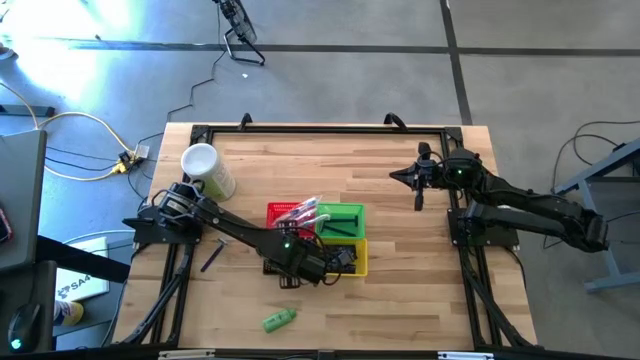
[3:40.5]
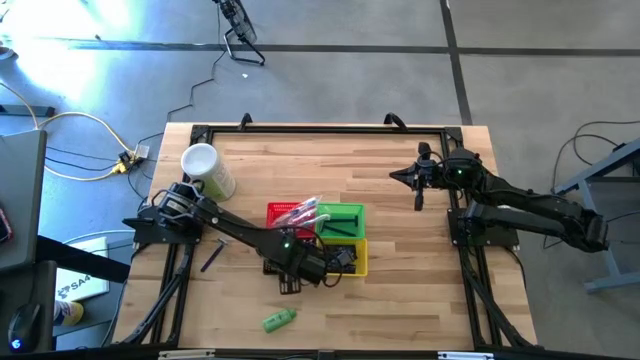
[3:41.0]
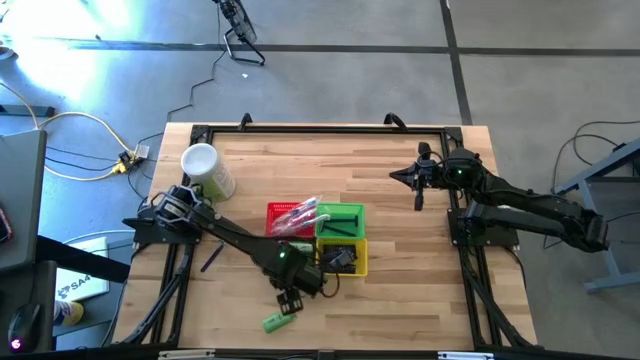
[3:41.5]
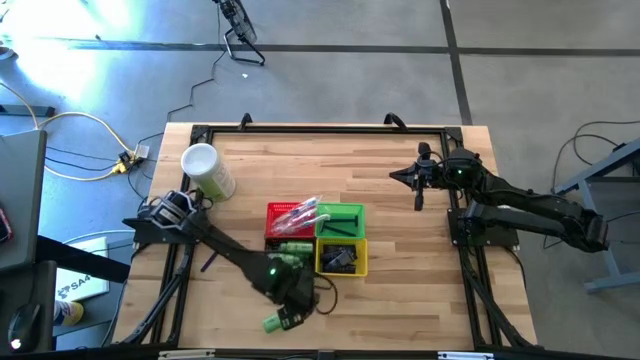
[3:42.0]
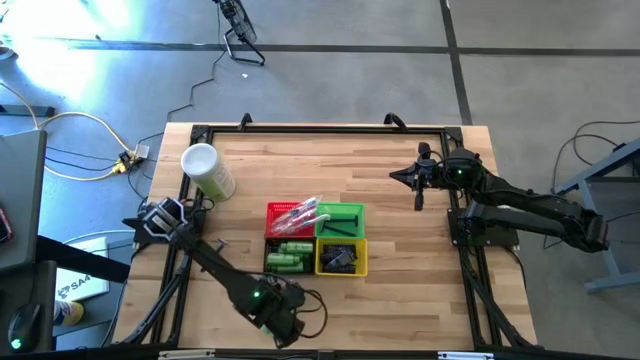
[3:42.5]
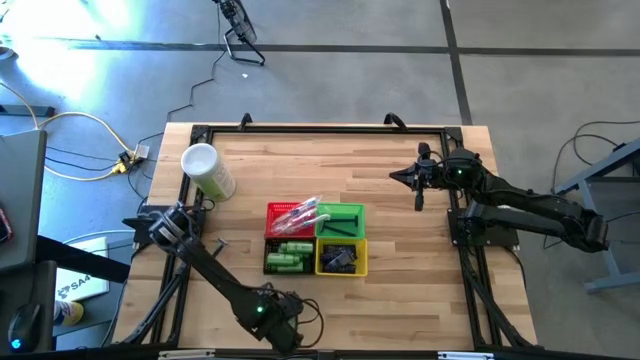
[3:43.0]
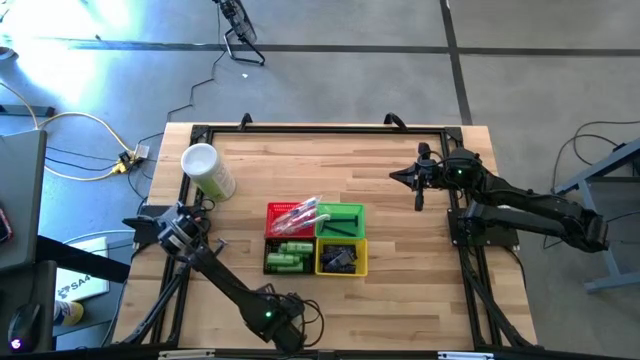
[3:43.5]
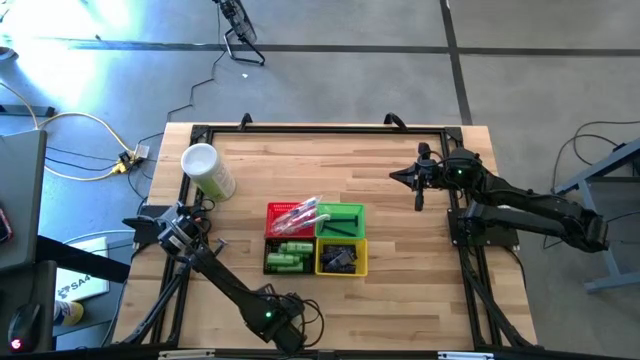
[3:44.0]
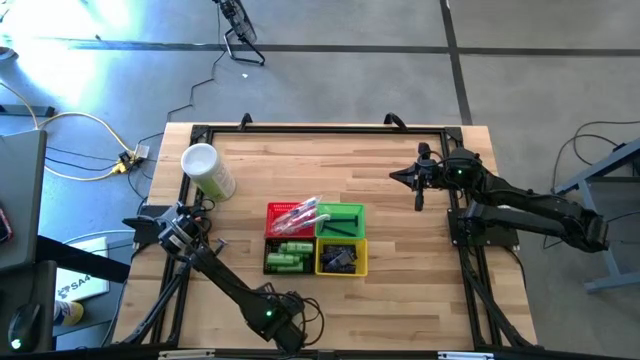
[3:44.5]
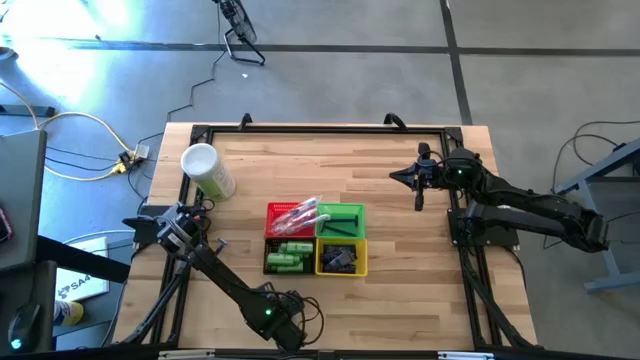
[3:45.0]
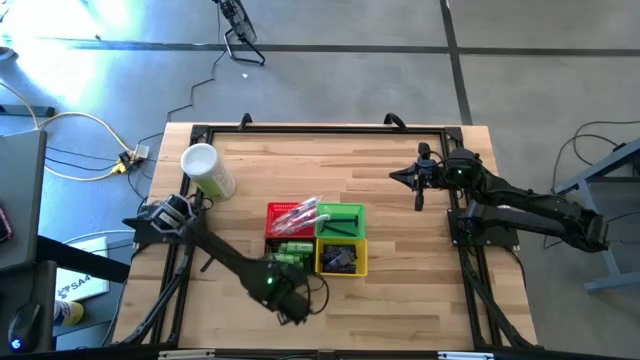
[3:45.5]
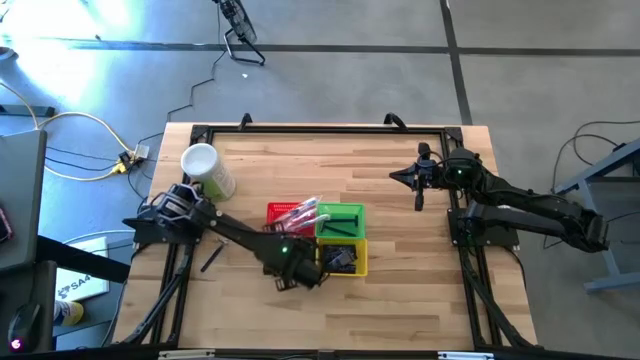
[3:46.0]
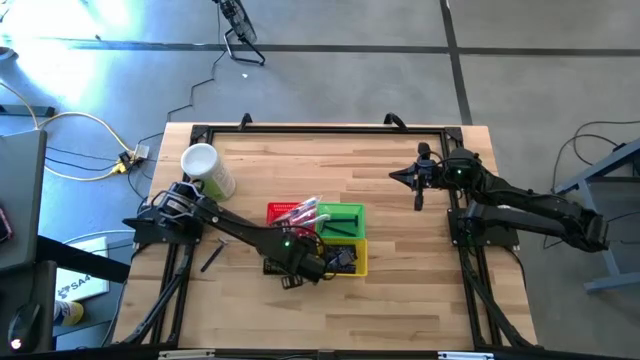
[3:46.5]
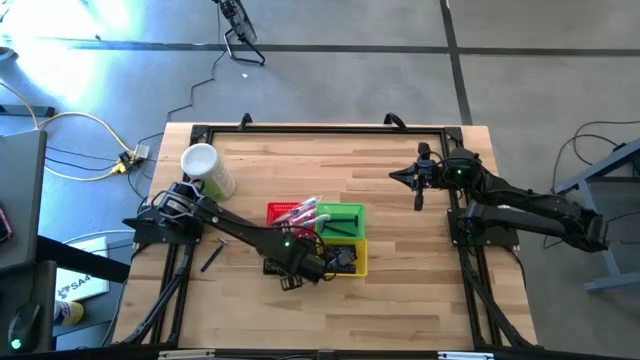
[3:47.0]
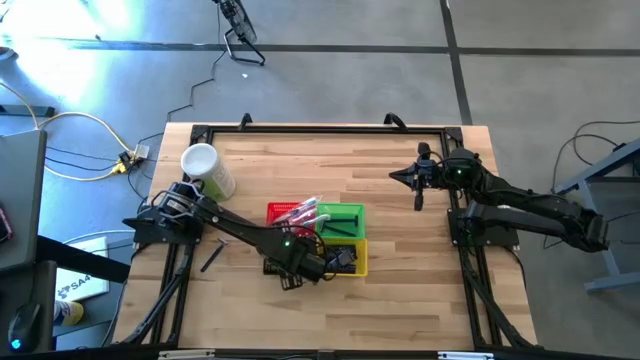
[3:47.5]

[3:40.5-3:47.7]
Task: Pick & Place Travel size toiletries
Put the green shampoo bottle into the black bin

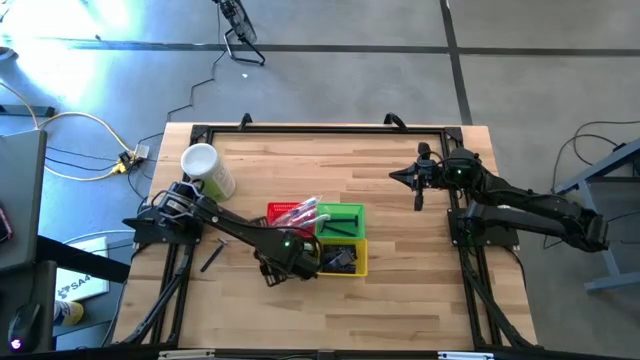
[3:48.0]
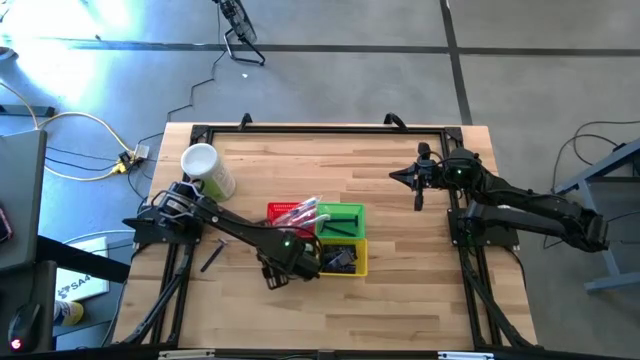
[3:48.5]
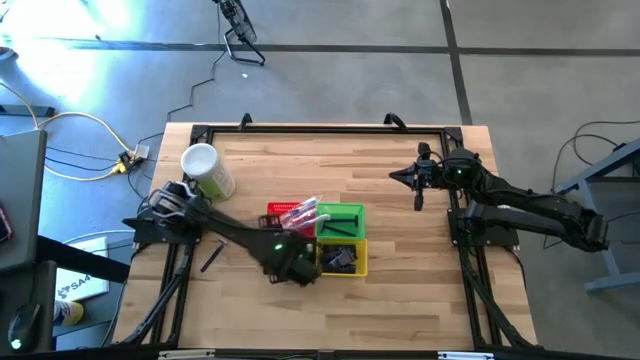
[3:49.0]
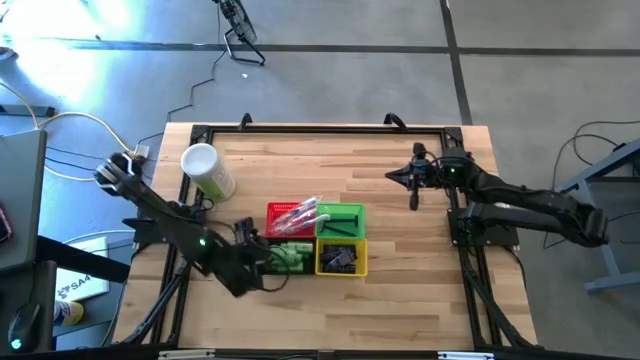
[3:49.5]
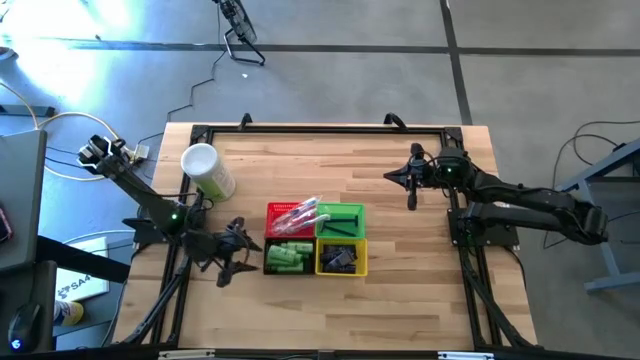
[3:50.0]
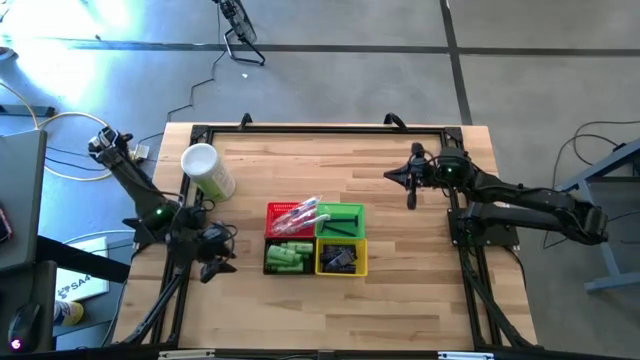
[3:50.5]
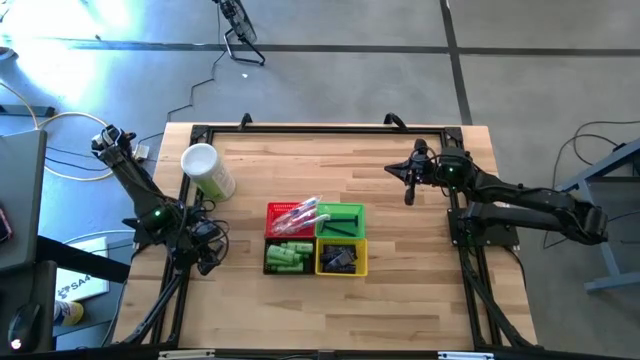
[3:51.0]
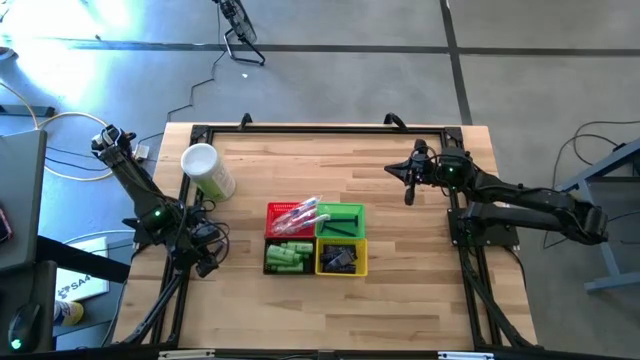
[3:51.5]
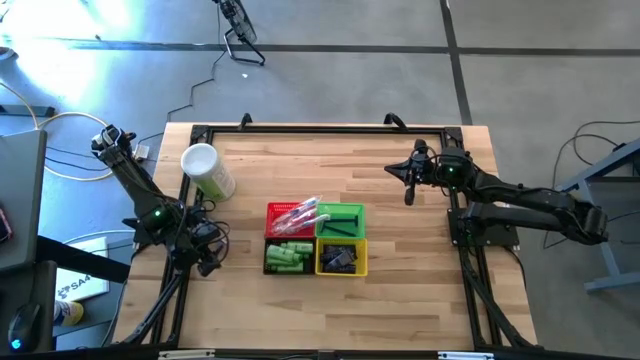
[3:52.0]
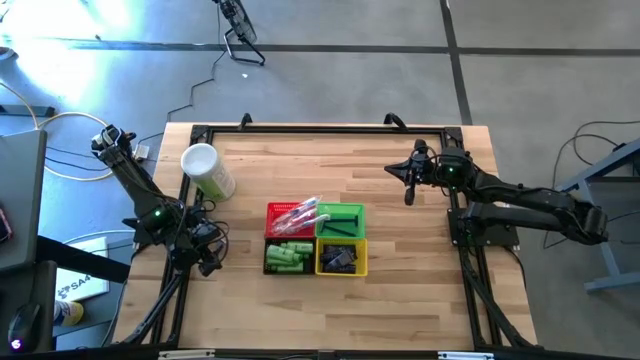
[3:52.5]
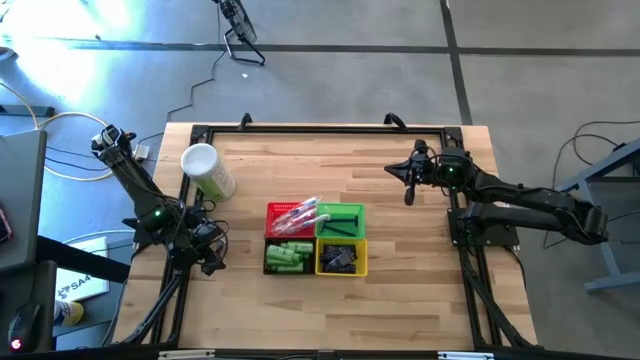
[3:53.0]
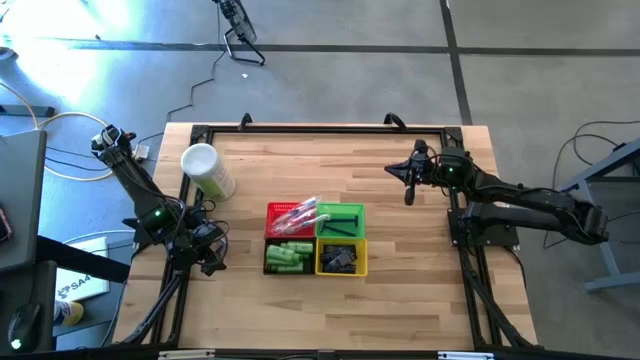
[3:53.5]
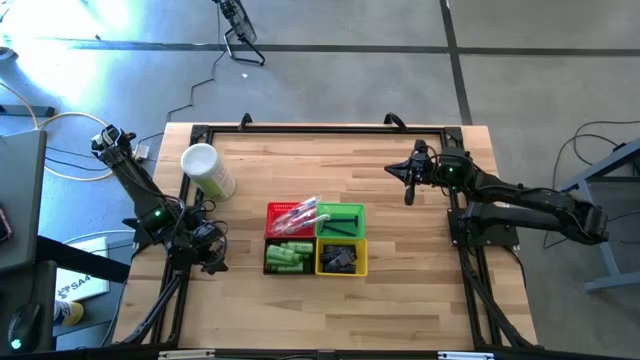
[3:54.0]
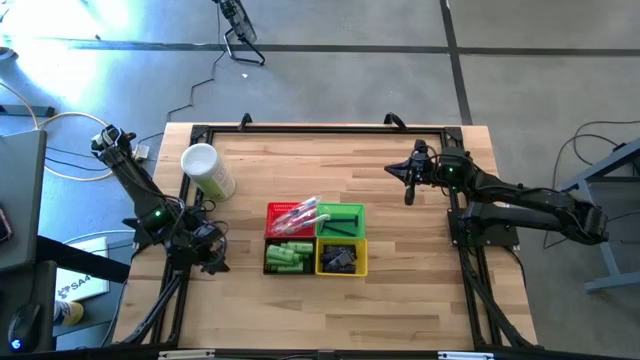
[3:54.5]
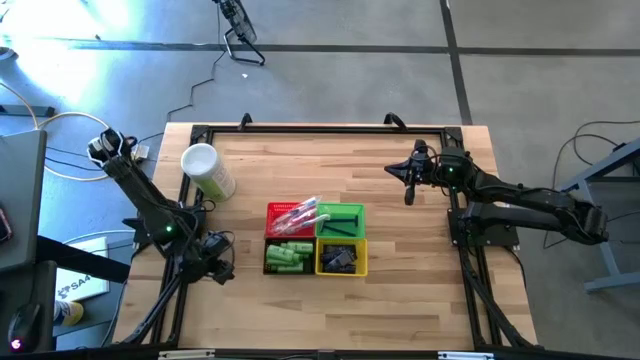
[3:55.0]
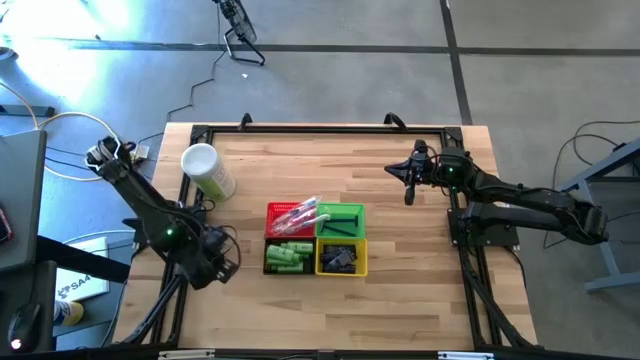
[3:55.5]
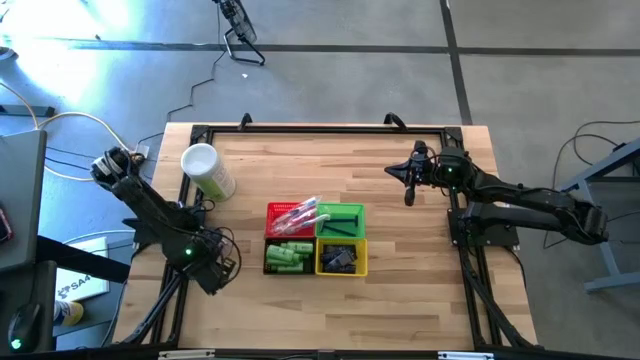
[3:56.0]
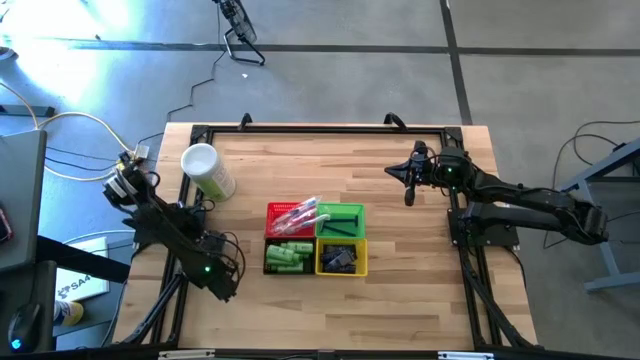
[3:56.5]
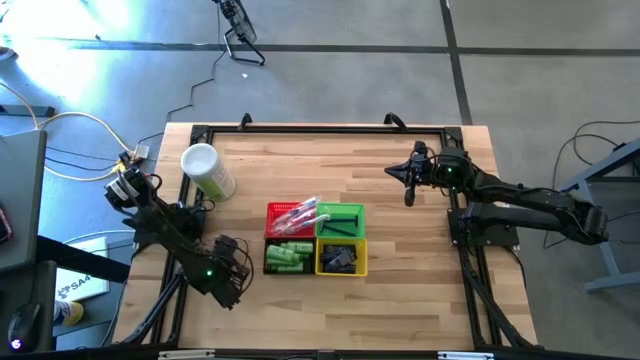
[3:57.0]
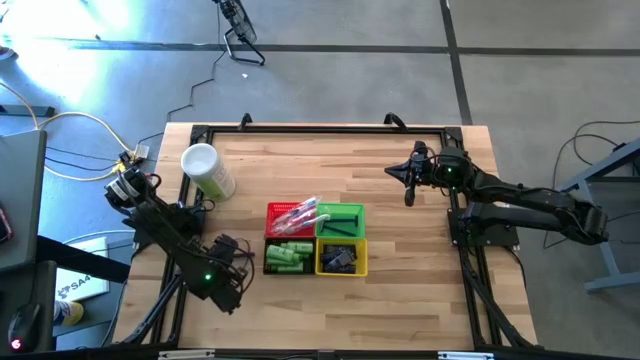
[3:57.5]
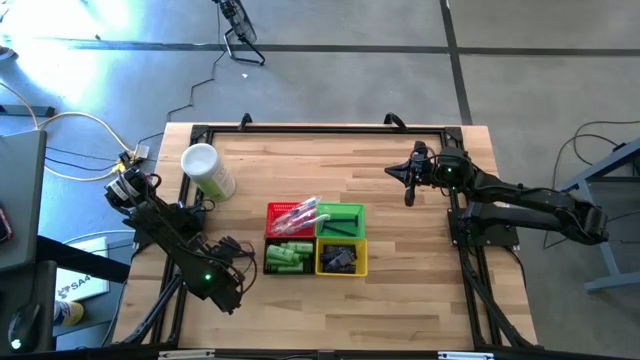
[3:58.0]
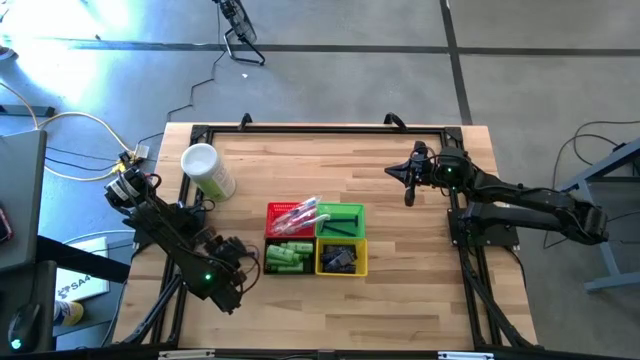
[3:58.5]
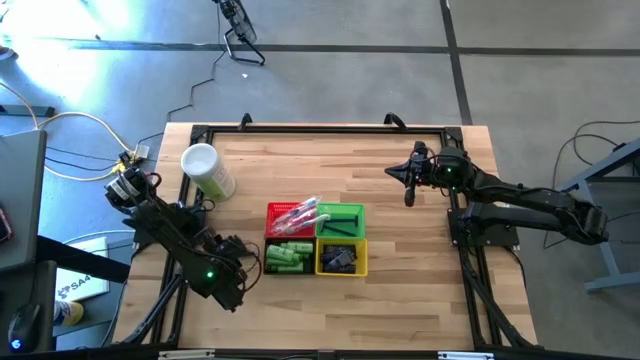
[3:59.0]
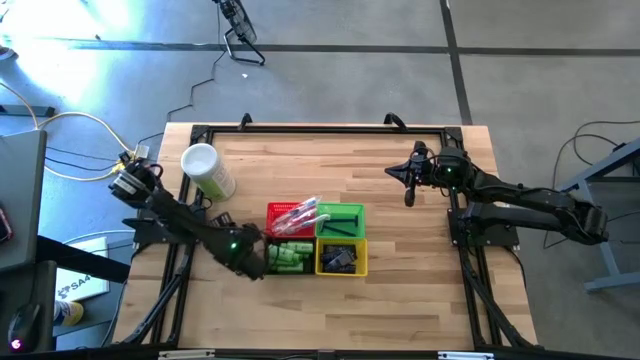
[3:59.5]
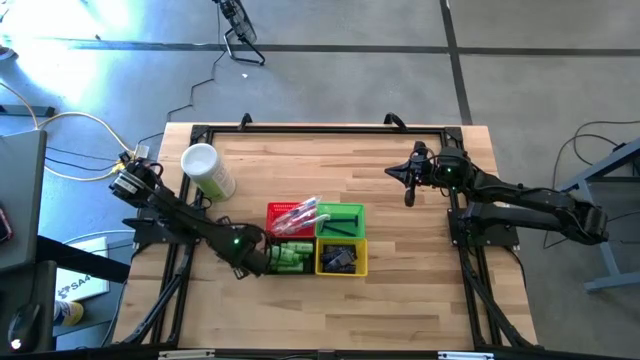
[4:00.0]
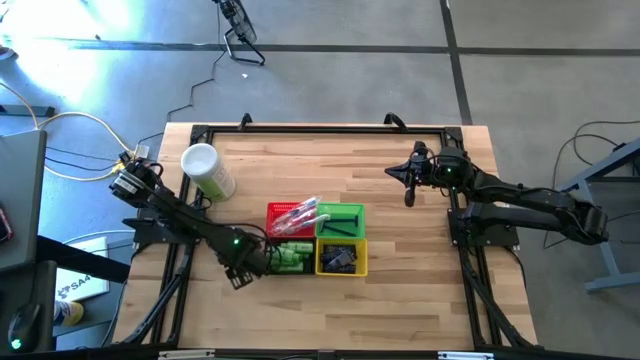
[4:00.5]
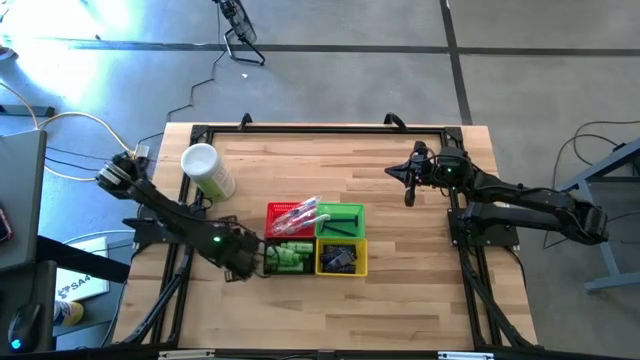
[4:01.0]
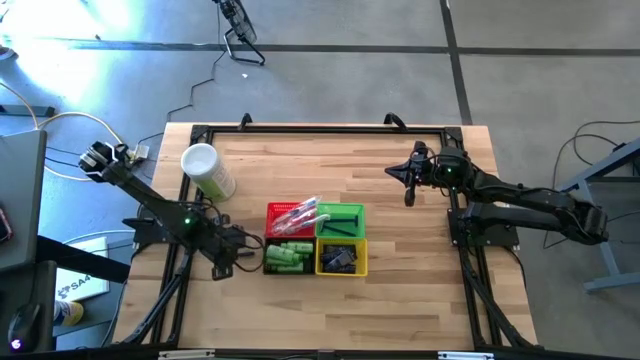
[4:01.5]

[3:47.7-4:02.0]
Put the blue razor into the green bin
